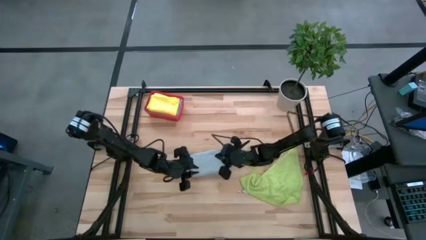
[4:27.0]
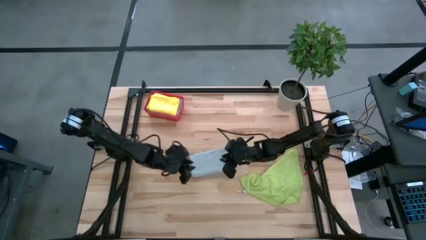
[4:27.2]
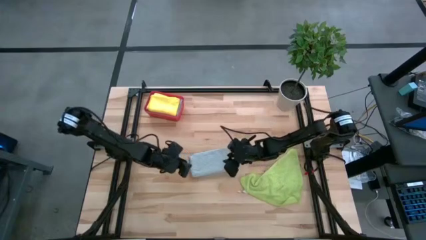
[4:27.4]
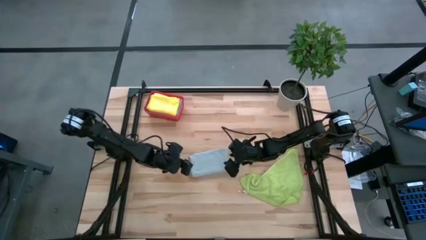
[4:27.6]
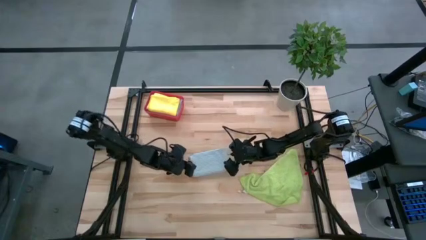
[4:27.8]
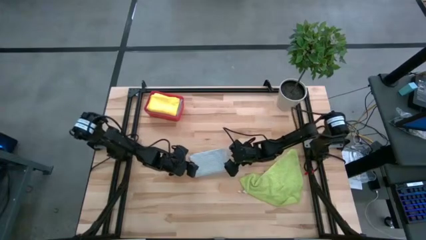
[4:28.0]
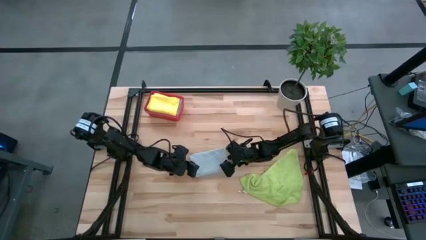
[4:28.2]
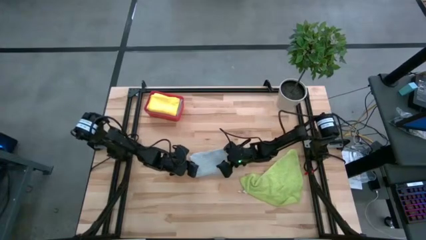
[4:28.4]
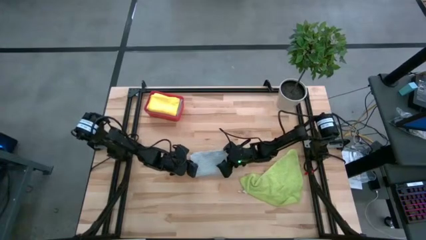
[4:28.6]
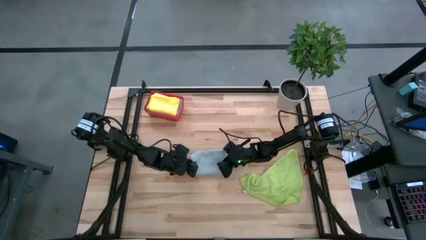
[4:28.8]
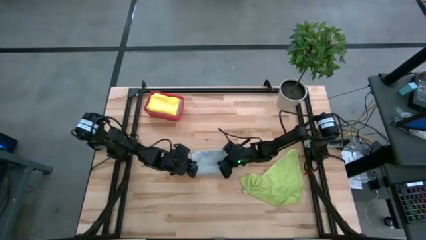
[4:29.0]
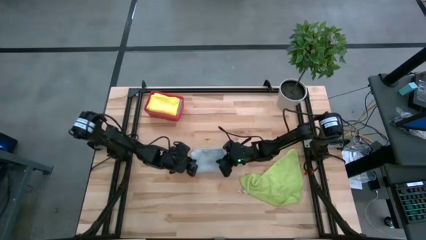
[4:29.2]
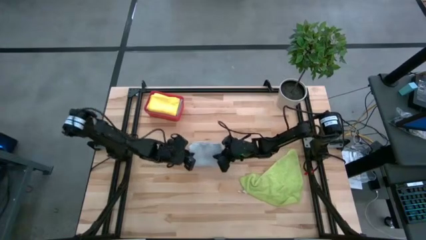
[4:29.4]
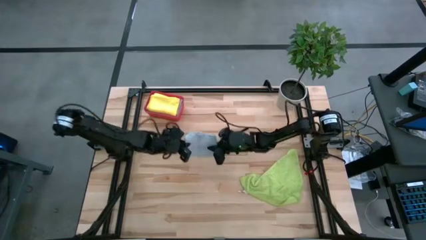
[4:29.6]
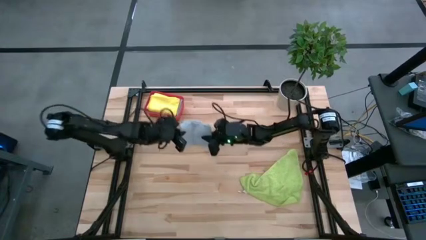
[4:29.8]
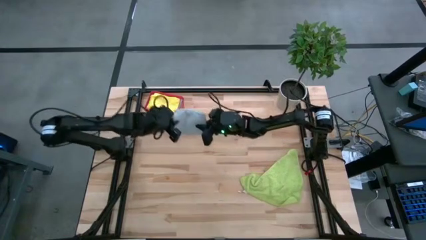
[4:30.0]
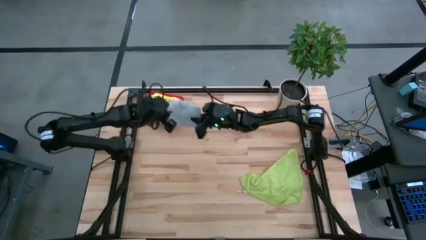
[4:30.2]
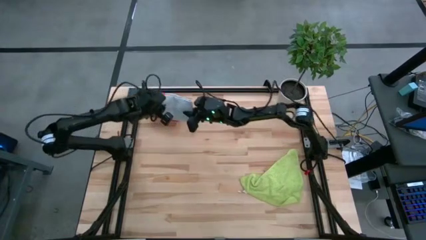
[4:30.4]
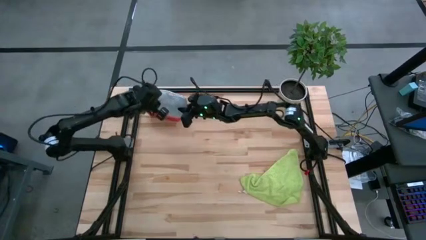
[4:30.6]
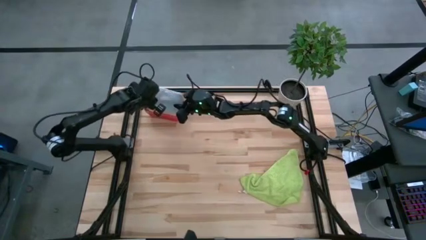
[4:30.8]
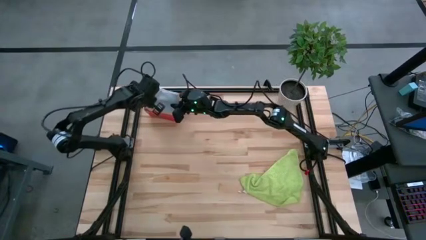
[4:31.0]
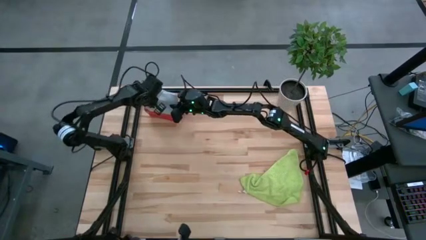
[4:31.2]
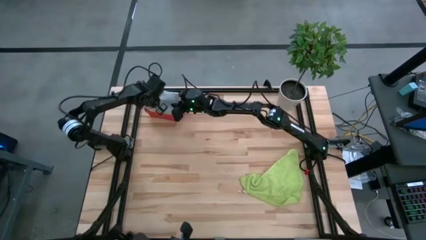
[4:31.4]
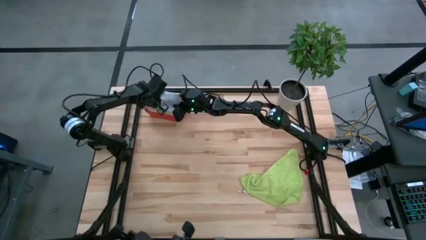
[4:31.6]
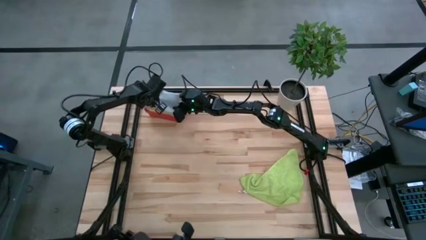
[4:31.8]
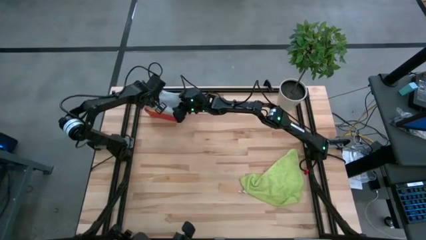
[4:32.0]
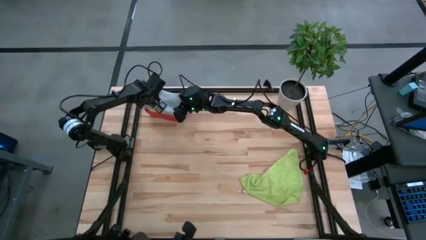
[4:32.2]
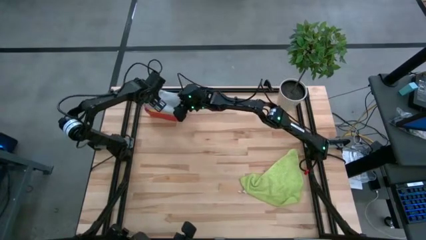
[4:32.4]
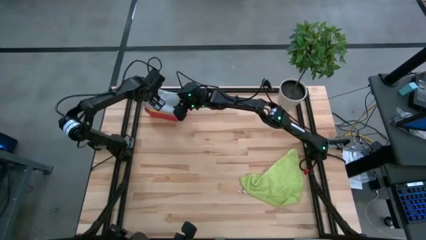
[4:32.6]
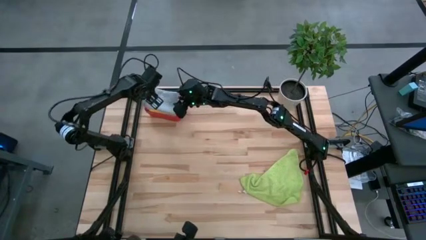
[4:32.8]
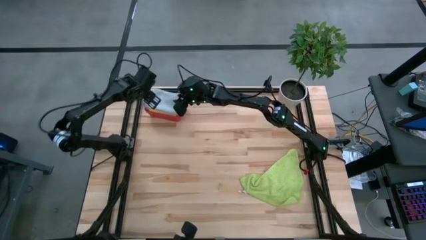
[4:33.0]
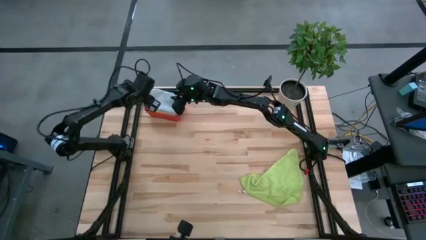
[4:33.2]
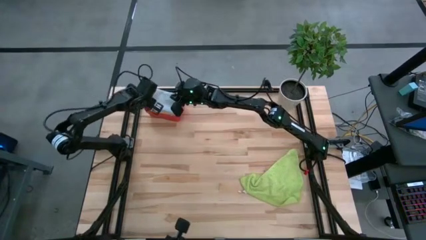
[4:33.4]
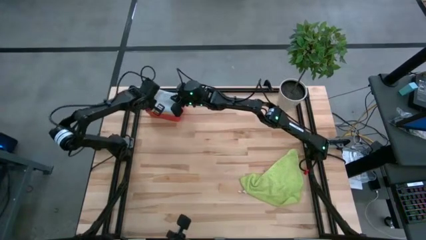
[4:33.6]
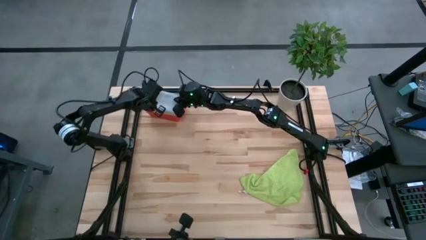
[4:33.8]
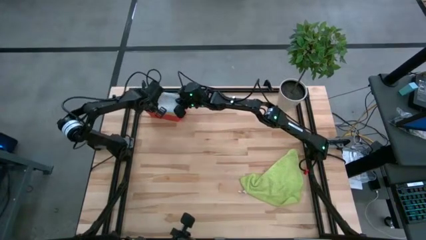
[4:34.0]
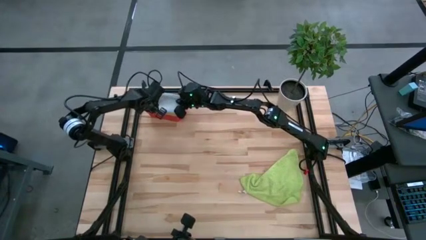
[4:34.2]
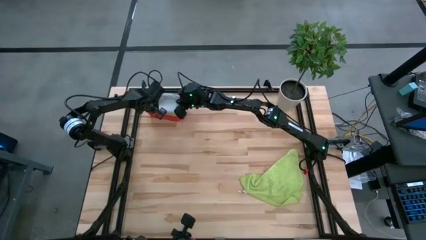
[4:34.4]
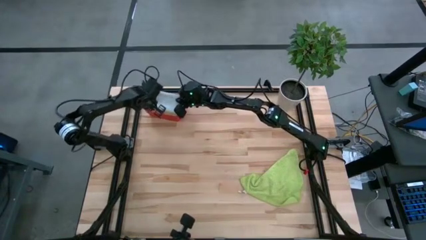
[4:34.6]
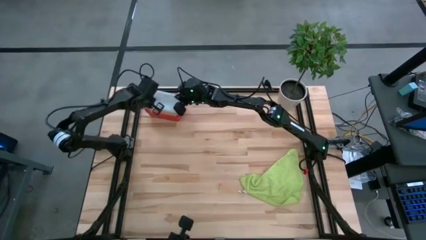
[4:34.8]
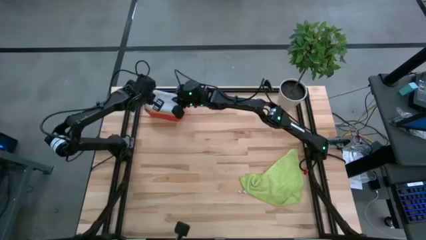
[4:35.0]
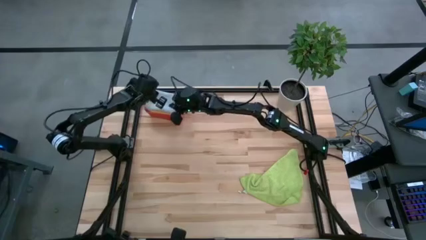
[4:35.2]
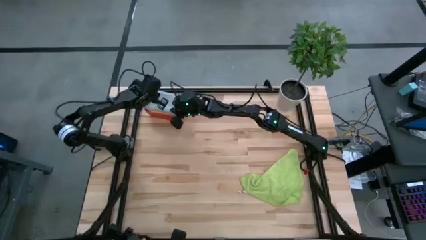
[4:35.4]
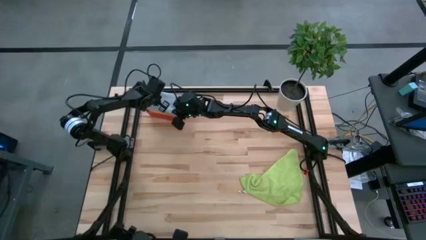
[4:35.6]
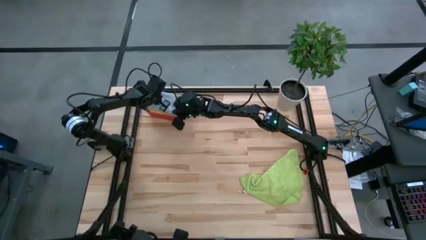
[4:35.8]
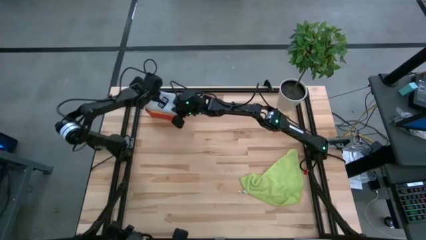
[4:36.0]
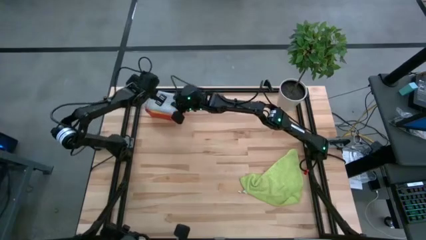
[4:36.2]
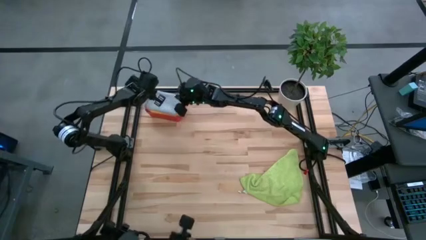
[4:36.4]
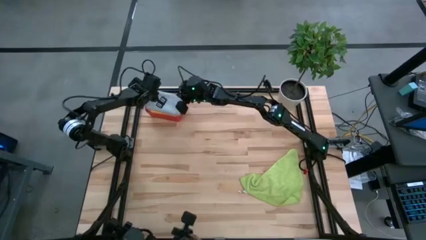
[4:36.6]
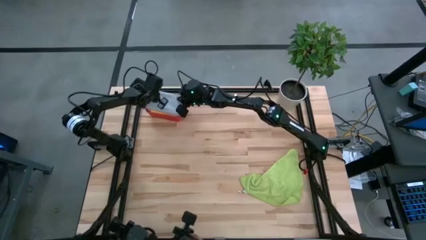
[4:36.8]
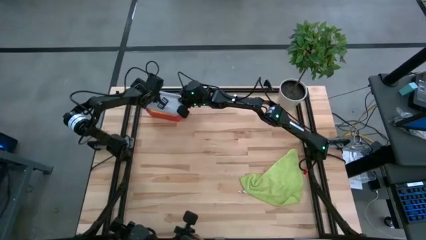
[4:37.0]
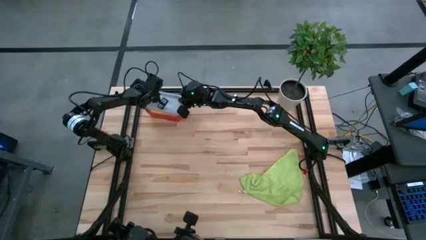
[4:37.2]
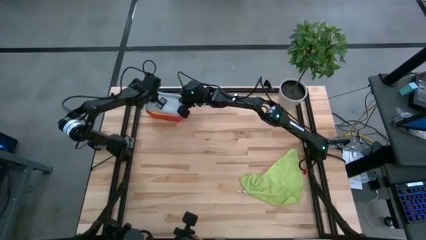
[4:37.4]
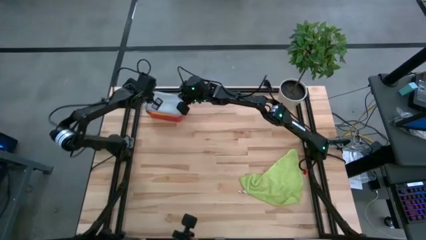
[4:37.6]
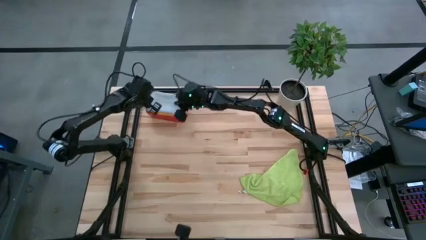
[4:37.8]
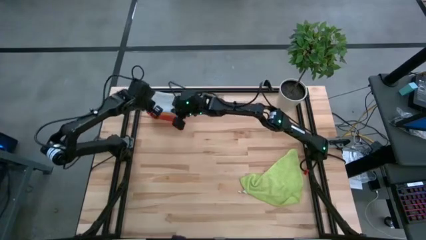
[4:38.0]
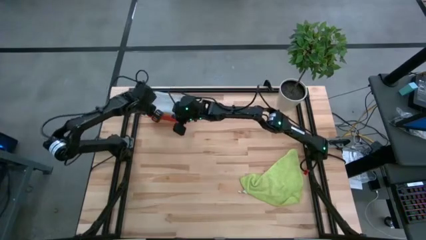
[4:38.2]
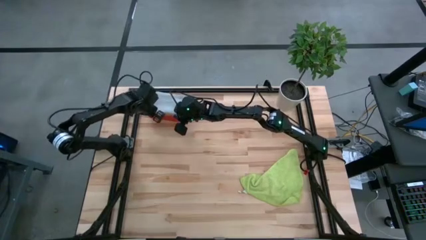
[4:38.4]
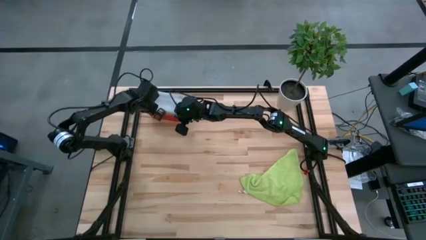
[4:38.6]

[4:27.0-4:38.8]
Task: Fold microfiber towels
Put the folded gray microfiber cloth into the red bin

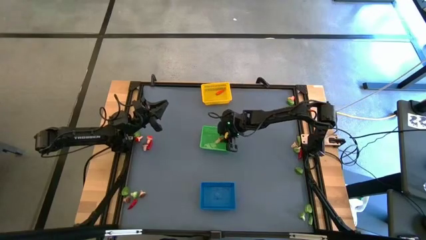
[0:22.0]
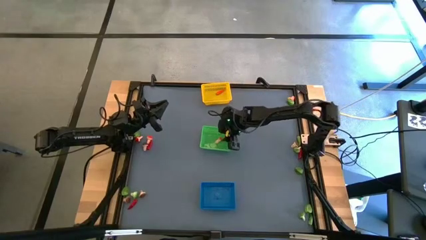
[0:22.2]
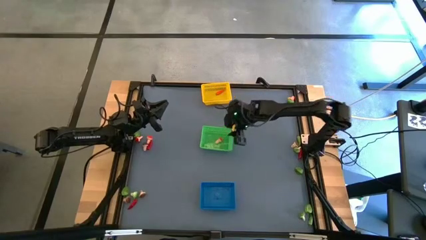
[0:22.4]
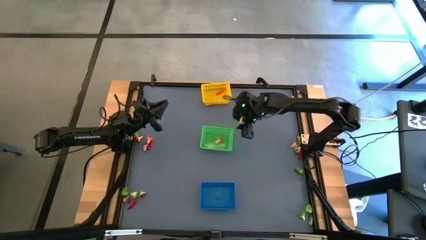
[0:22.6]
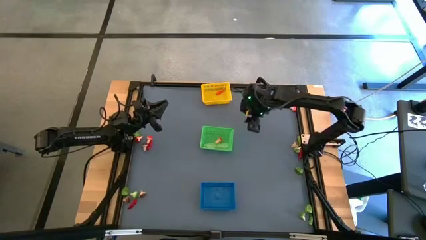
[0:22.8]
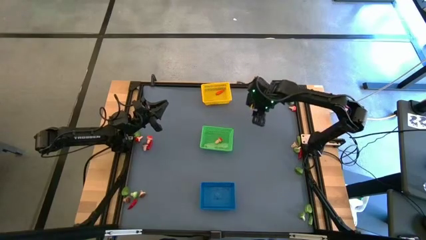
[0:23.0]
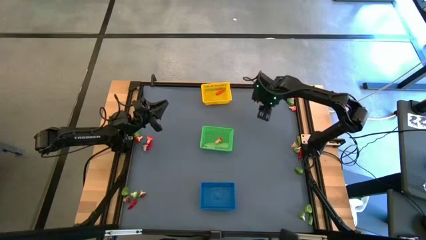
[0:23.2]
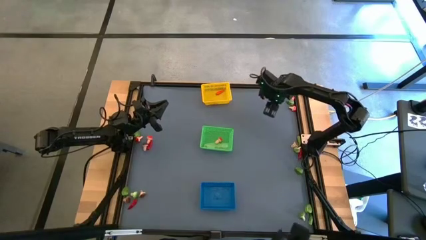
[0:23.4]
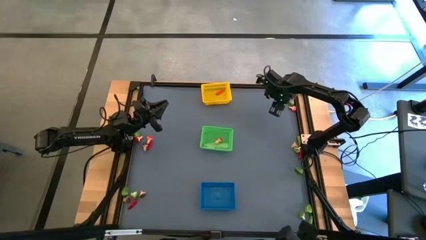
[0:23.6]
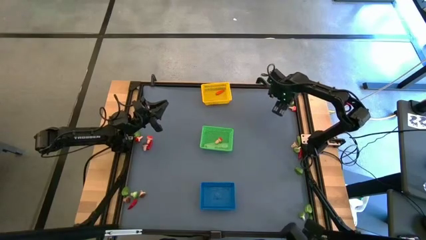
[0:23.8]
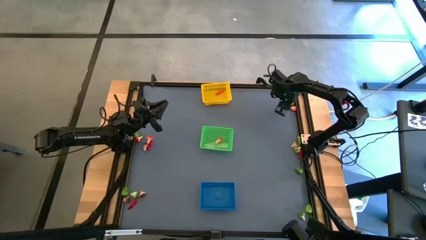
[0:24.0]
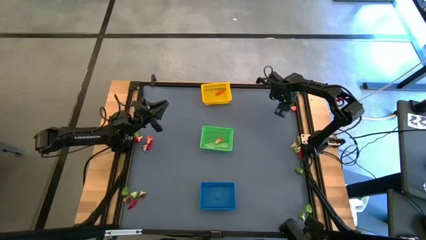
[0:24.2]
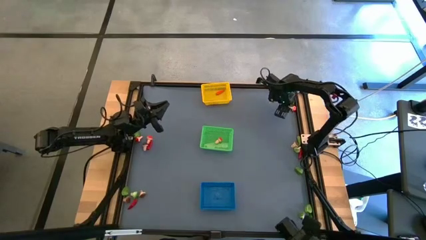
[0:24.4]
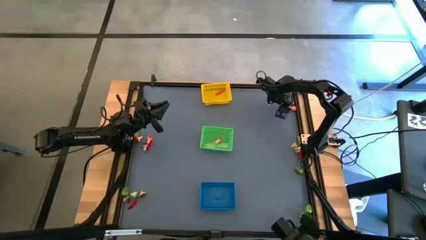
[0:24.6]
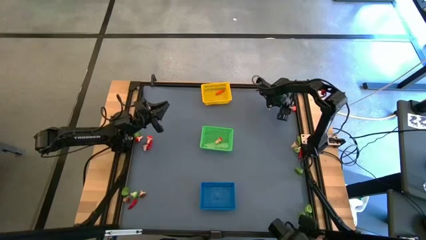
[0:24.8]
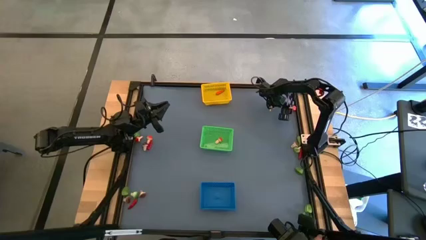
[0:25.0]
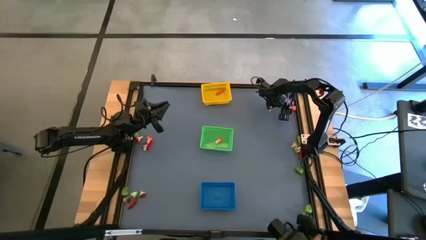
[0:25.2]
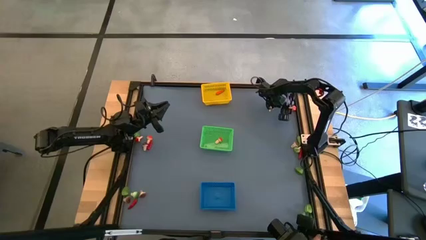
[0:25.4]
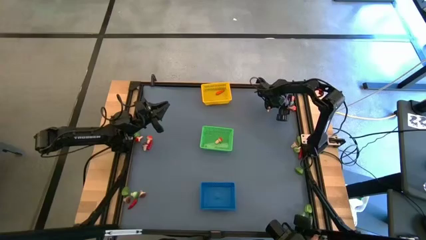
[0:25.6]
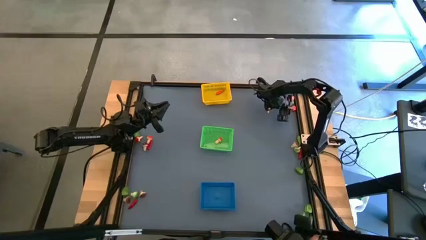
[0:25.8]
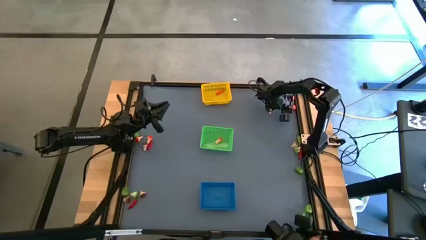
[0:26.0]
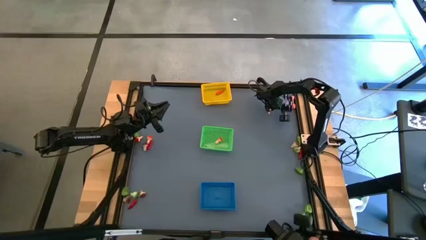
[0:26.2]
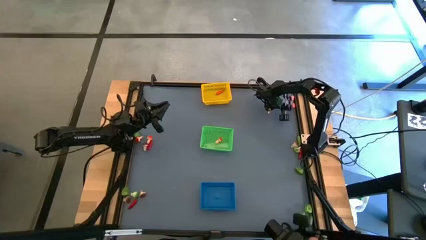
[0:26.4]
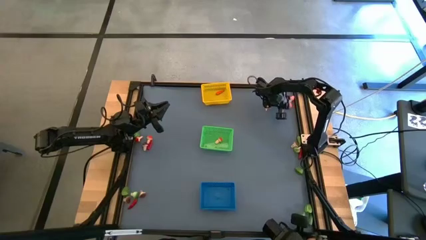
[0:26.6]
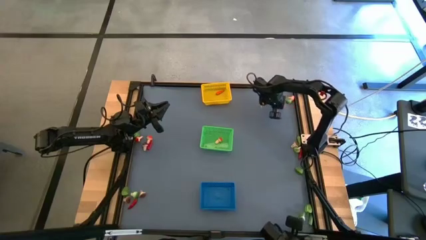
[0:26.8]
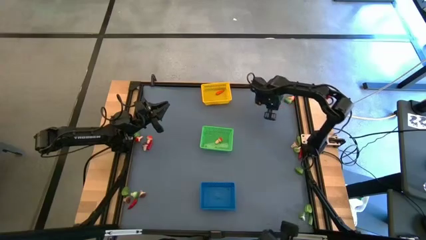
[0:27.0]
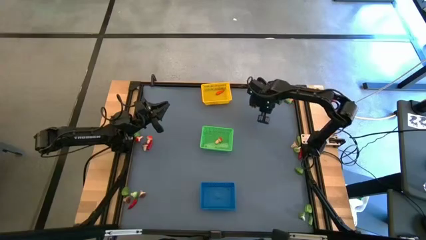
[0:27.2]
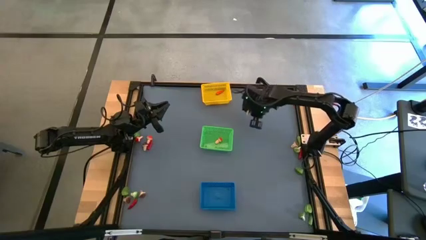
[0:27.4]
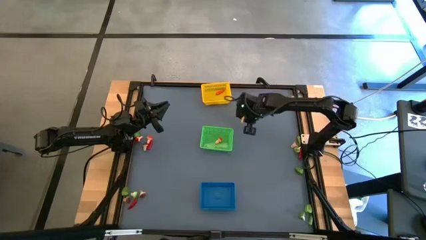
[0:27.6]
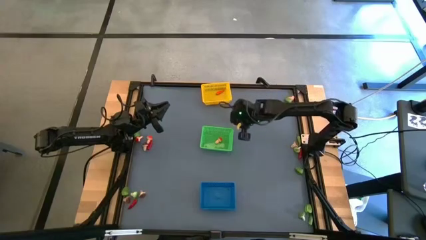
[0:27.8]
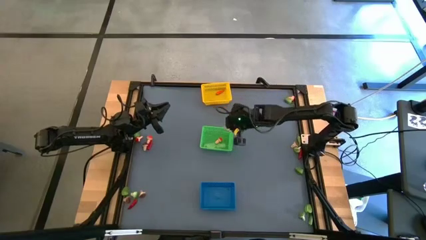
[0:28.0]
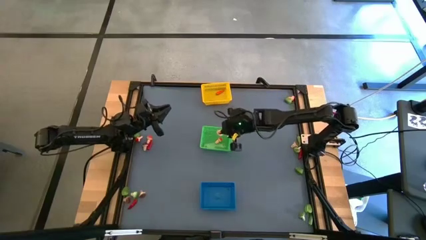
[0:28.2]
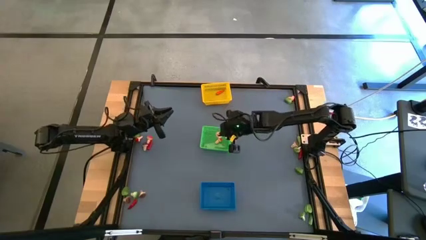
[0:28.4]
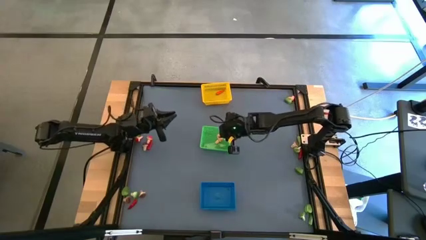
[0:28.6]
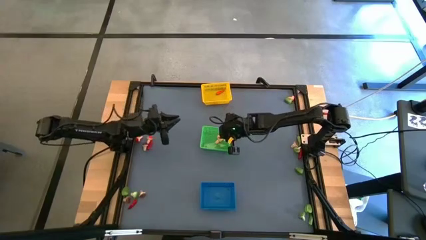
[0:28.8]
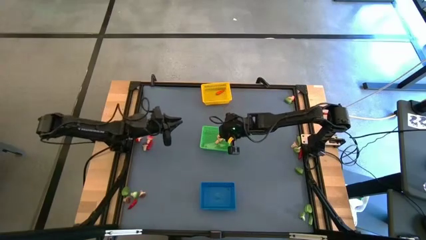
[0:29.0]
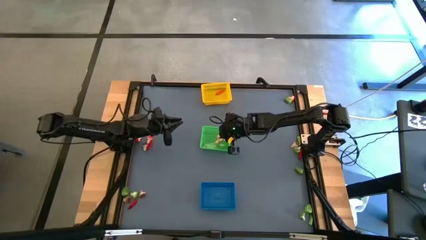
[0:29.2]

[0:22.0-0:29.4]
Task: Sort produce into baskets
Put the red mushroom into the green bin
